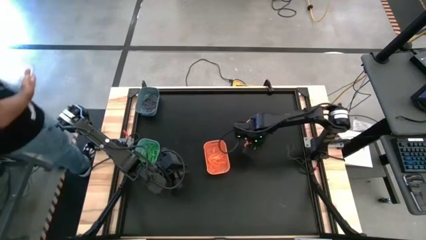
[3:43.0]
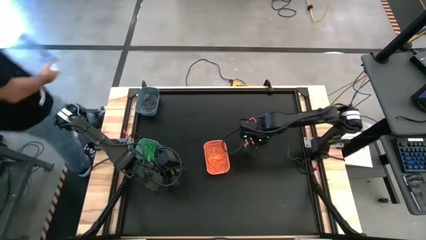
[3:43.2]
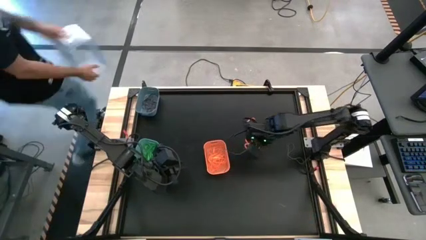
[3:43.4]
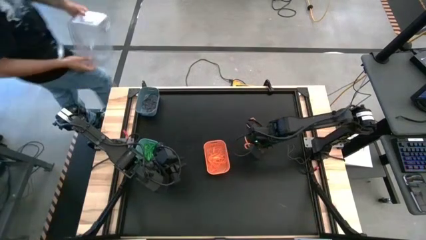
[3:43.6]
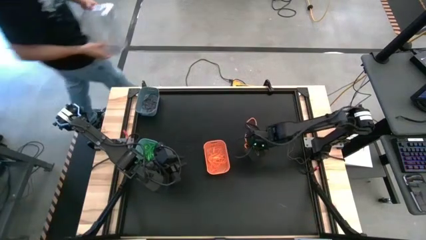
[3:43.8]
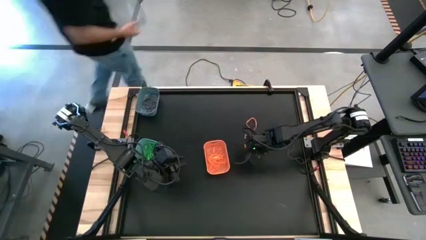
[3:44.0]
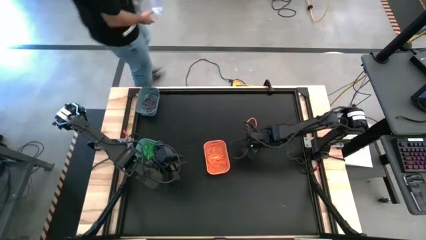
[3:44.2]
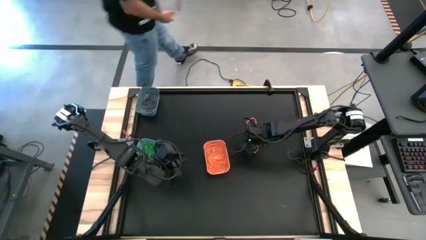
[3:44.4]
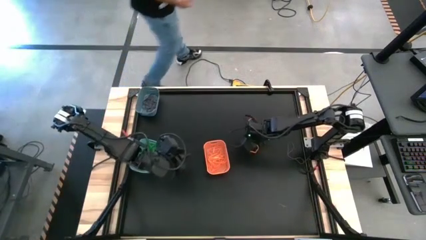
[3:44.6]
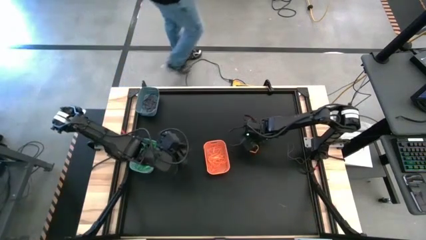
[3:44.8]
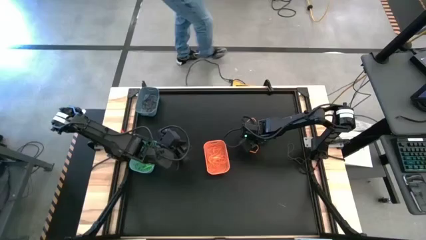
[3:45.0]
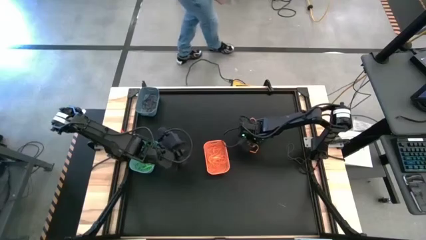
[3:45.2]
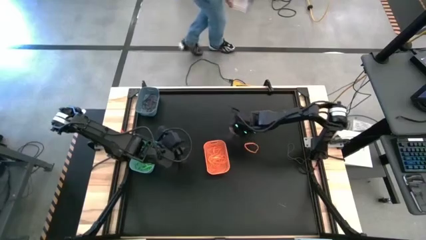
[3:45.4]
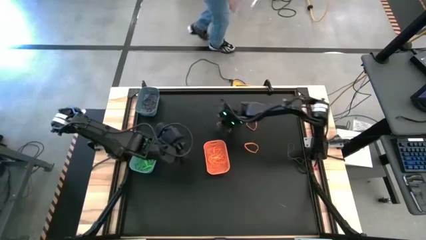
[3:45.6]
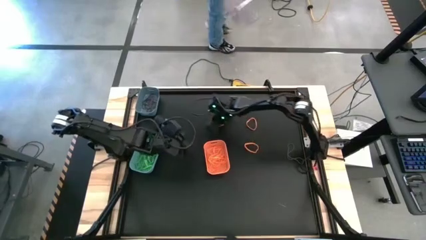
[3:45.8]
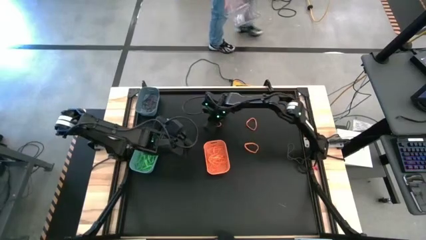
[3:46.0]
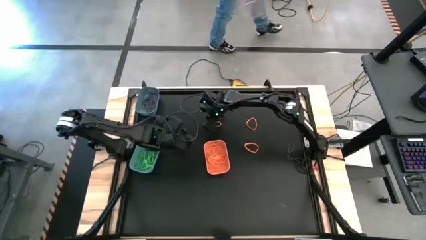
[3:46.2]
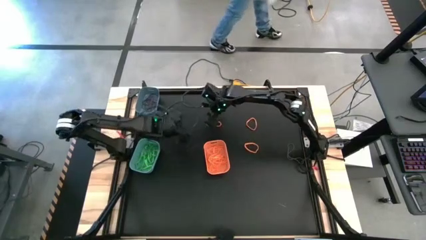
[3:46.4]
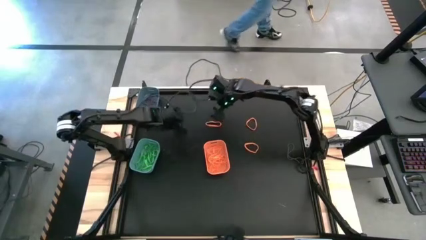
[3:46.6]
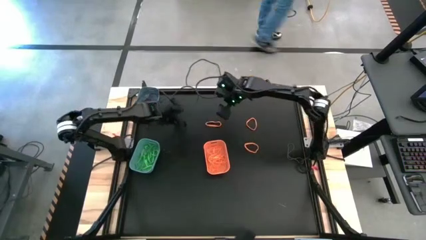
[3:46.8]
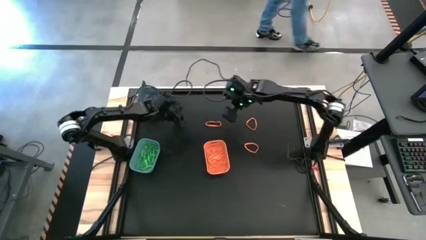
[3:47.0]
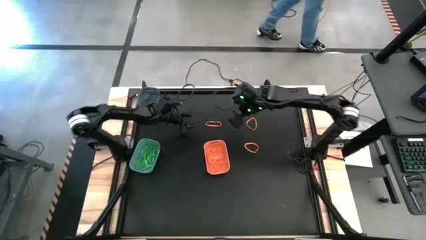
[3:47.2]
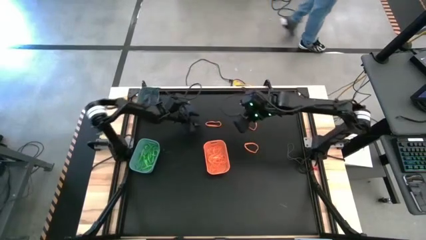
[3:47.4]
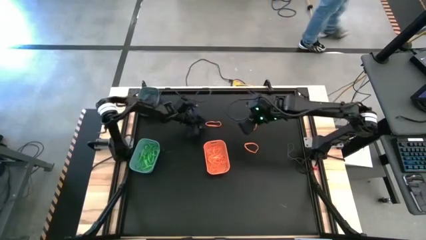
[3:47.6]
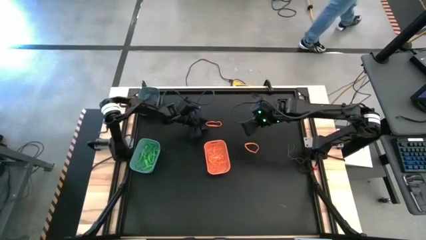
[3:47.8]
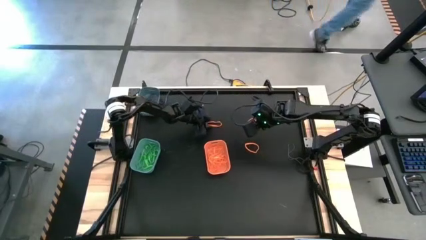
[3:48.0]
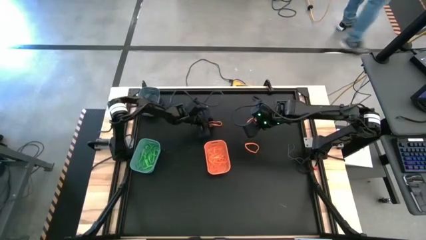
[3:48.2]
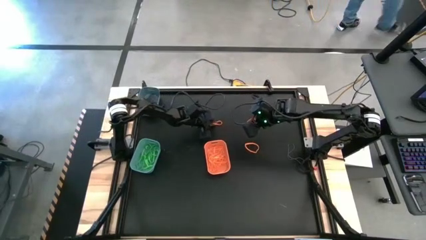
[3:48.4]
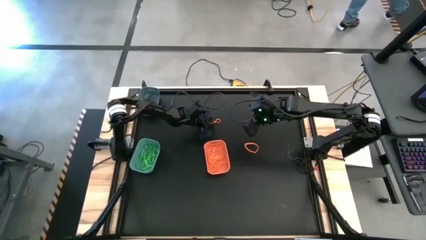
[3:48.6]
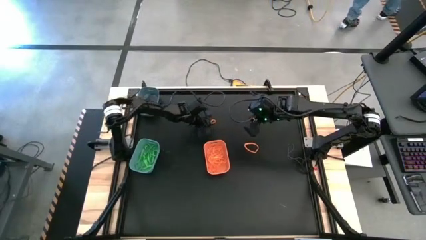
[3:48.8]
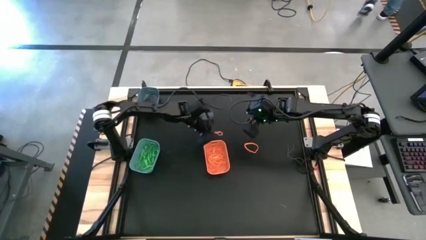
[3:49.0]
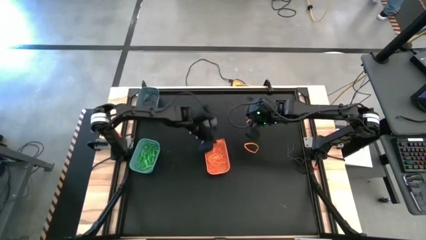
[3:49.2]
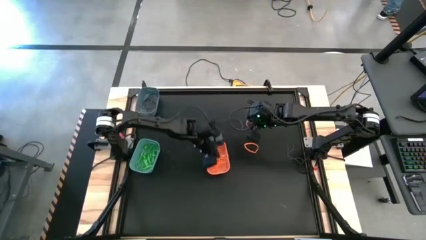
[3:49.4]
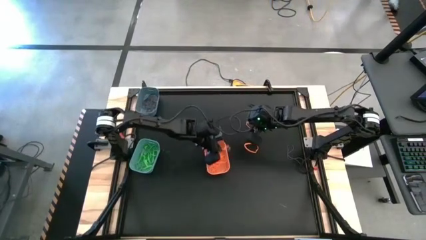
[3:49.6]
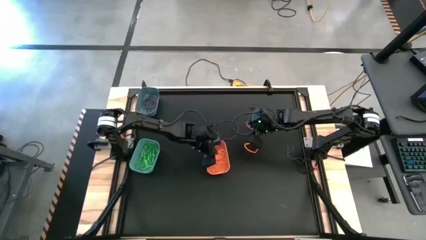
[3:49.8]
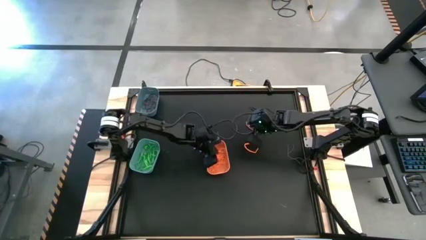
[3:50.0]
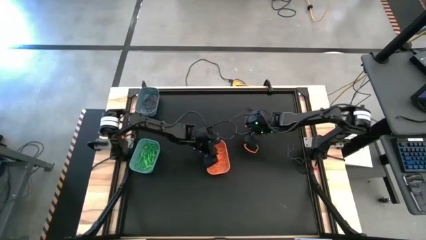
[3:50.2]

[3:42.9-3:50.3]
Task: Sort rubber bands into baskets
Put the orange rubber band into the orange bin

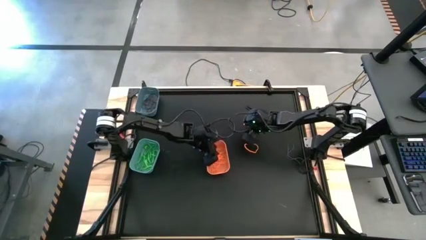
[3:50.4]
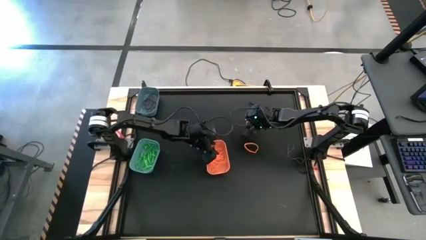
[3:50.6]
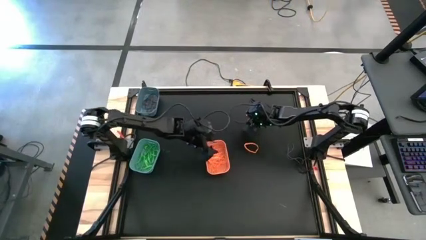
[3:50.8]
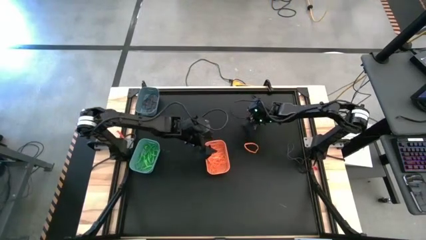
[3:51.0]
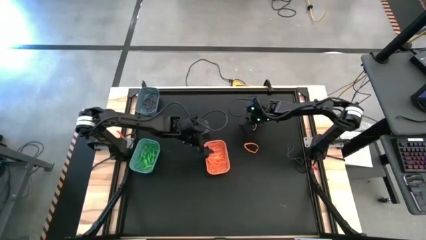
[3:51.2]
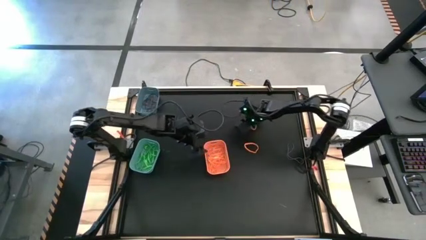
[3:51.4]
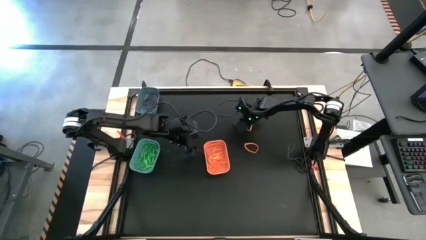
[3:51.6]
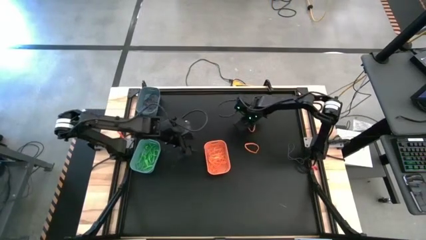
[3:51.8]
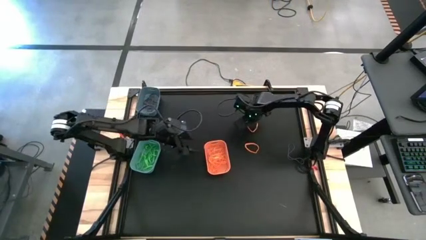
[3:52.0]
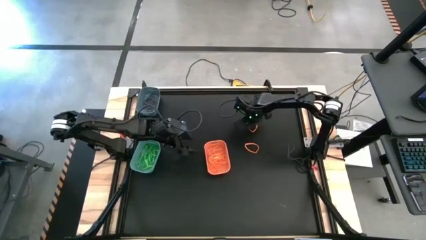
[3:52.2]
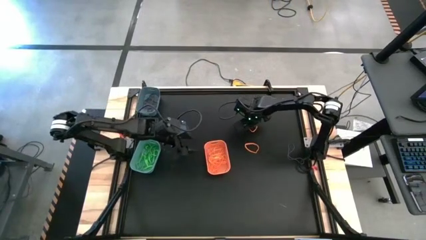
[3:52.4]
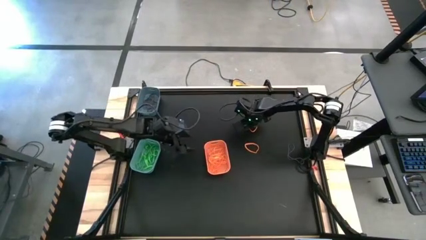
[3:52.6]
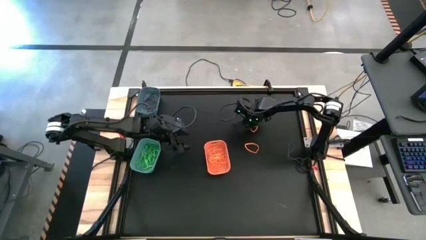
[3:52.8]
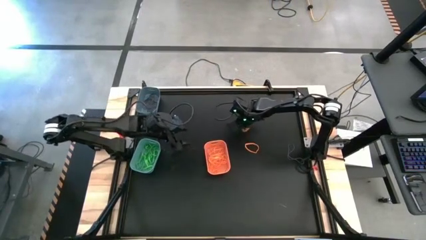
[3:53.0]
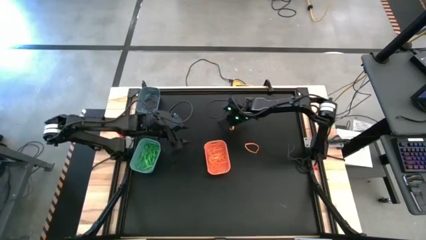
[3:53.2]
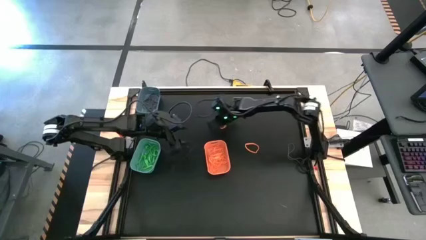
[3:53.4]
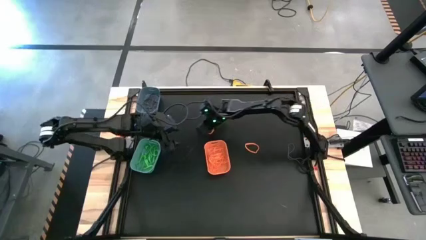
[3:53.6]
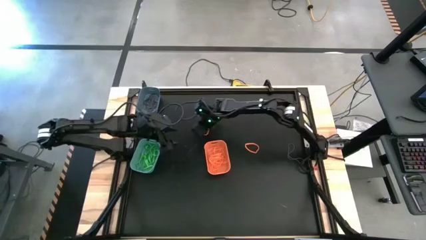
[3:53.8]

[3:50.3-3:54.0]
Move the orange rubber band

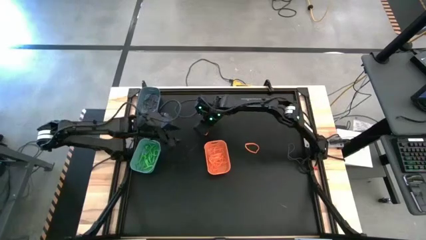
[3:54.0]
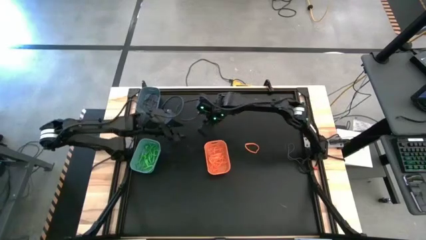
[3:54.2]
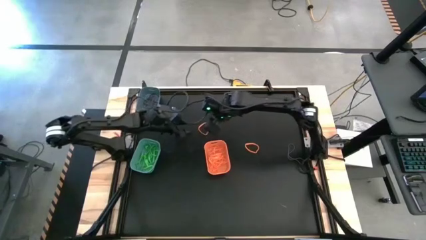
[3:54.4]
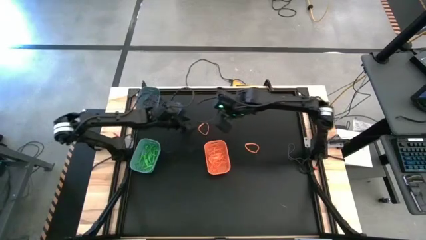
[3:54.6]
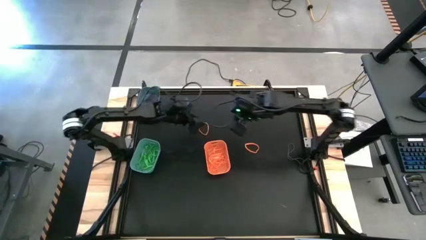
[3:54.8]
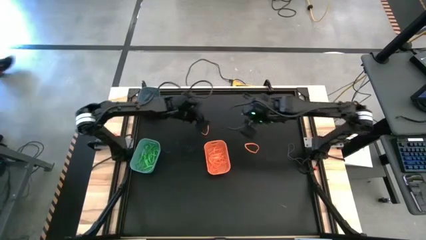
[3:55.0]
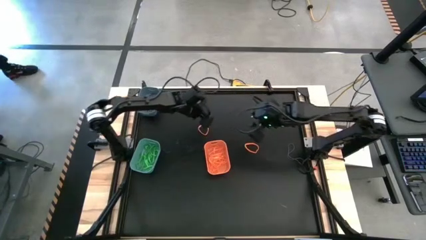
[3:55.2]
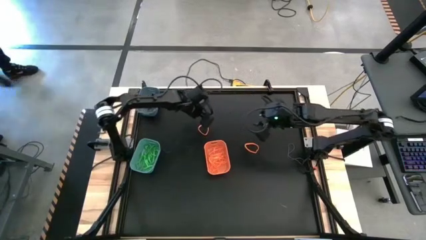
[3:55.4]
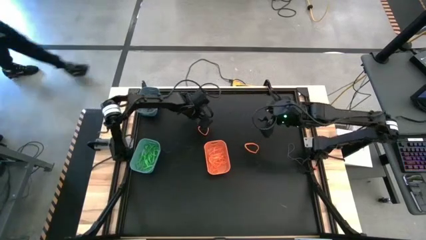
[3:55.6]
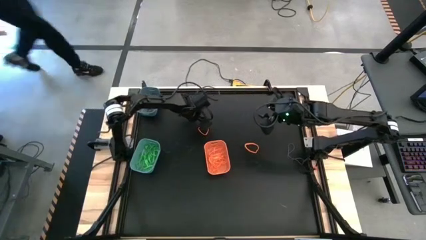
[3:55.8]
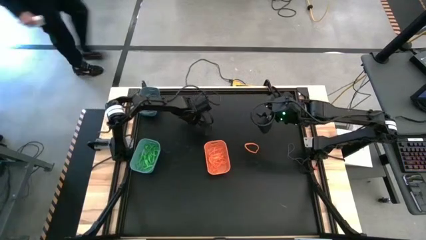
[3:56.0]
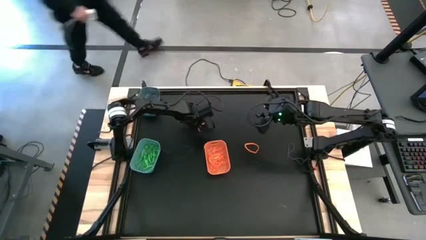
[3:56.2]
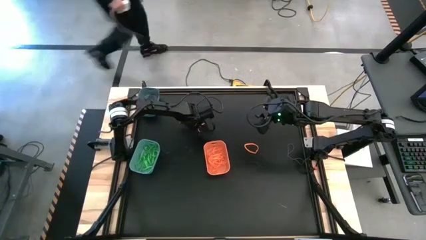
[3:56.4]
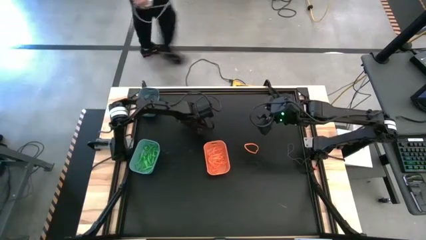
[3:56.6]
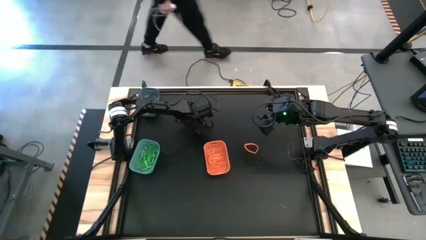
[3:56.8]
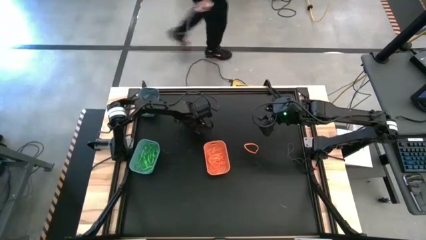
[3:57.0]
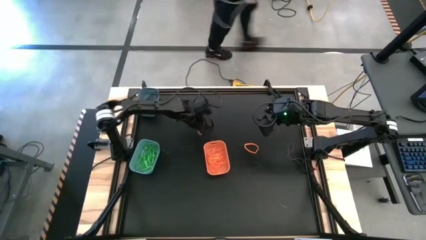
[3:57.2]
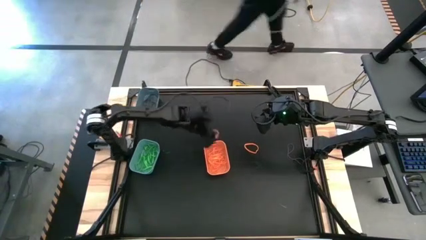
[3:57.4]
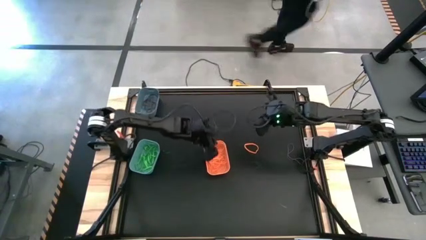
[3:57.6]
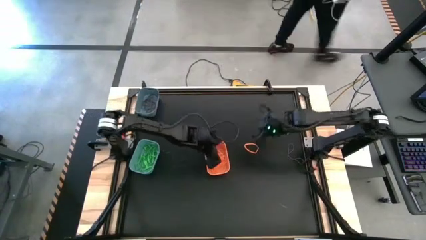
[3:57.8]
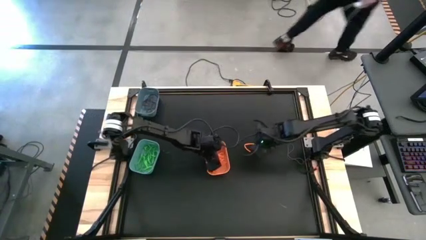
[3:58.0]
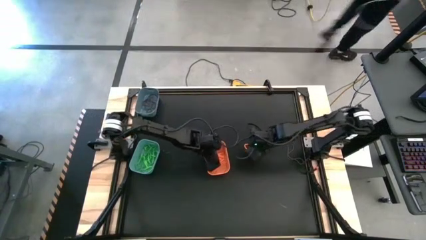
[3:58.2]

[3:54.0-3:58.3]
Put the orange rubber band into the orange bin

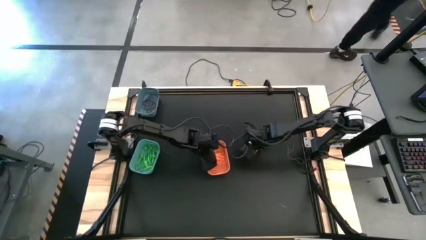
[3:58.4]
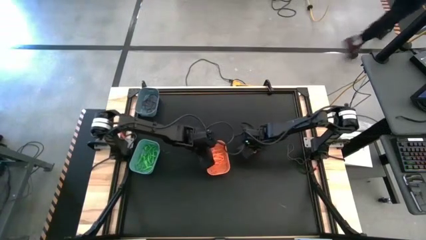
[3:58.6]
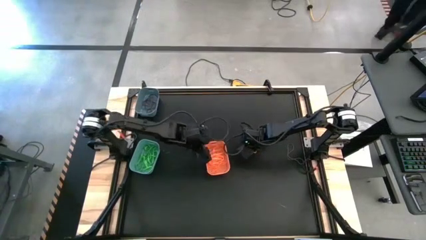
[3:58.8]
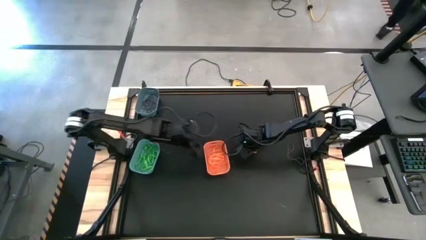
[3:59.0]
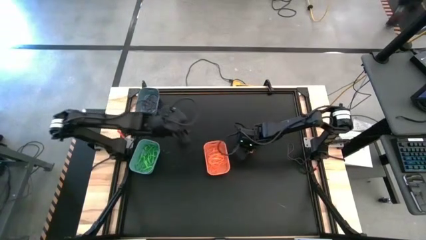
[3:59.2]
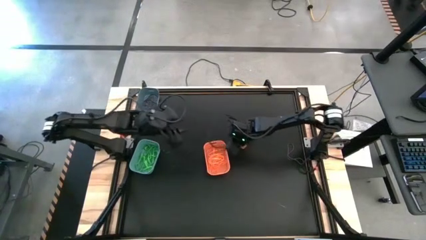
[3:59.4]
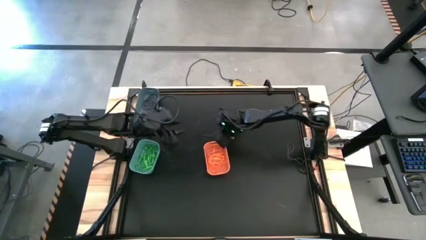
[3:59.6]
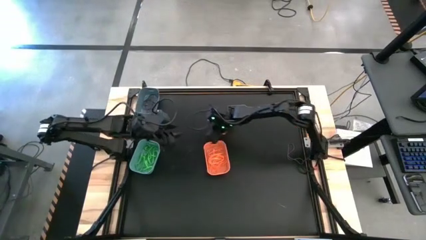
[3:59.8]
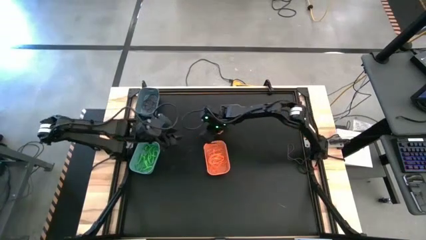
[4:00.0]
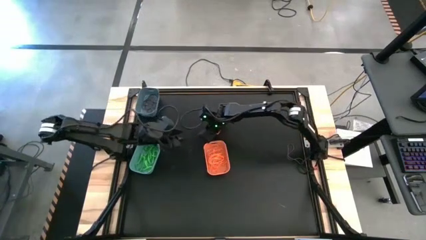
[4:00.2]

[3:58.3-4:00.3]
Move the orange rubber band
